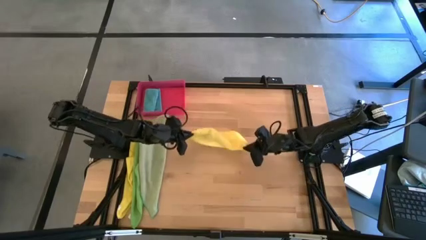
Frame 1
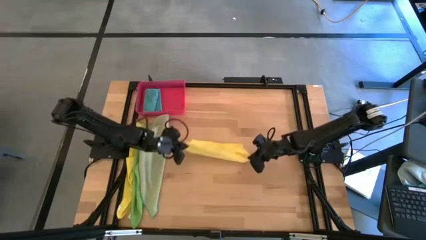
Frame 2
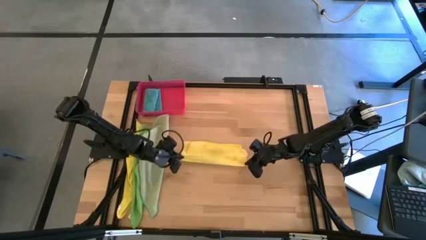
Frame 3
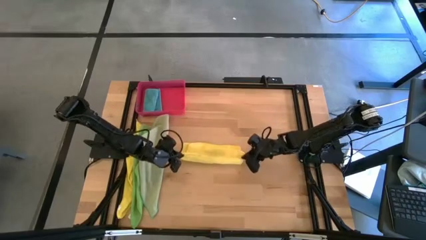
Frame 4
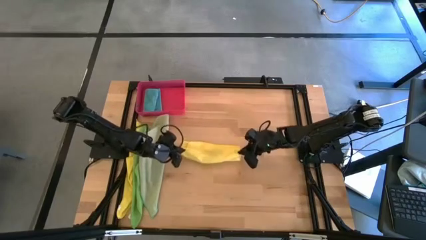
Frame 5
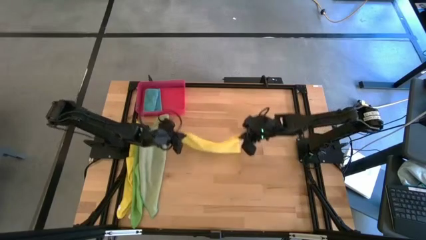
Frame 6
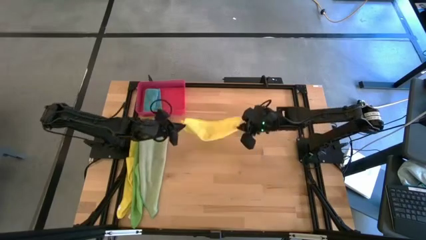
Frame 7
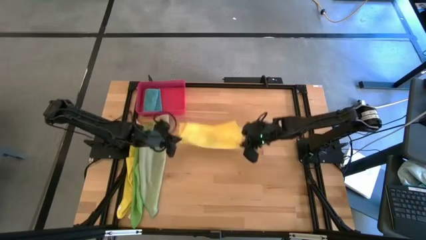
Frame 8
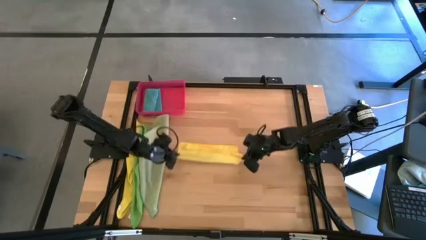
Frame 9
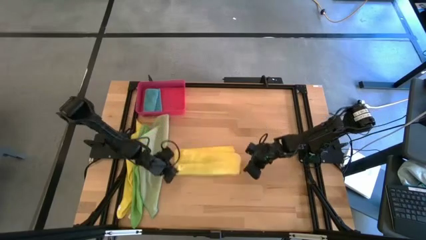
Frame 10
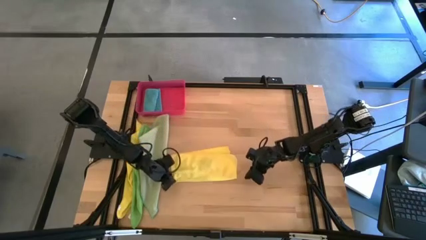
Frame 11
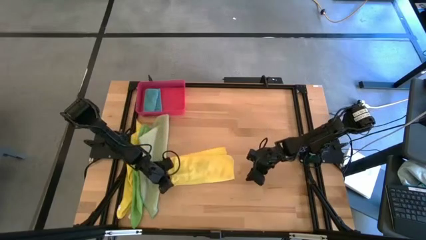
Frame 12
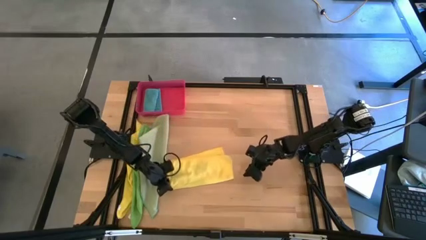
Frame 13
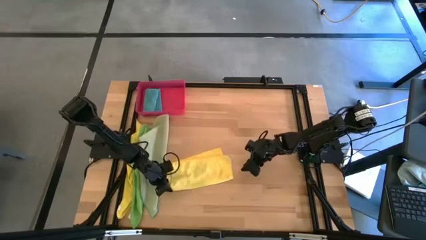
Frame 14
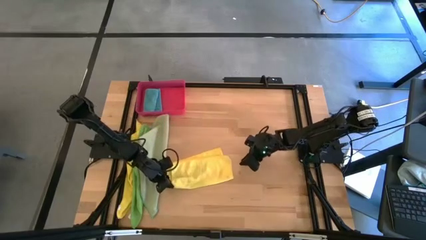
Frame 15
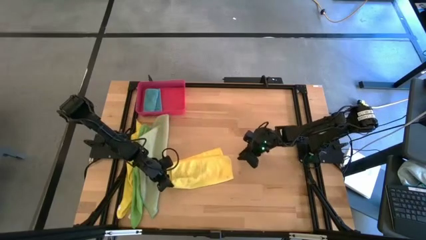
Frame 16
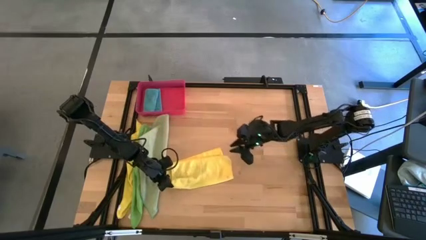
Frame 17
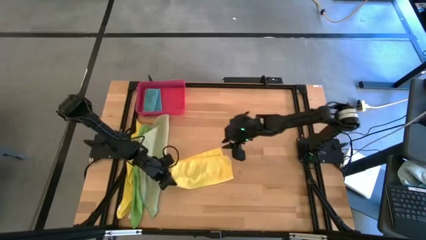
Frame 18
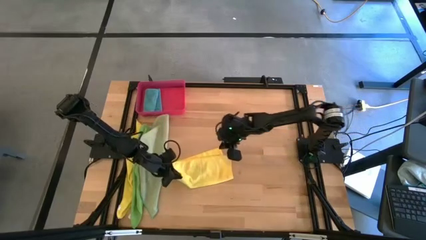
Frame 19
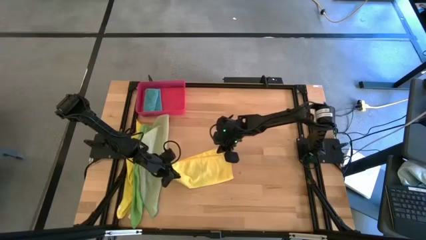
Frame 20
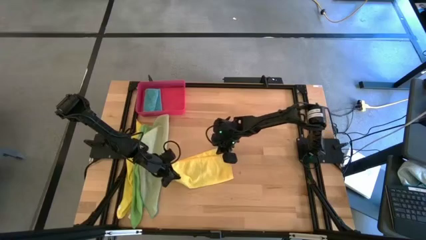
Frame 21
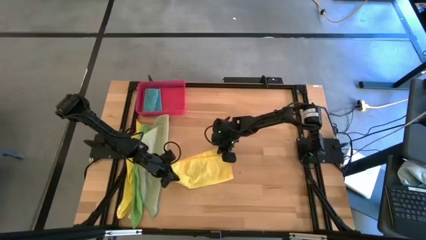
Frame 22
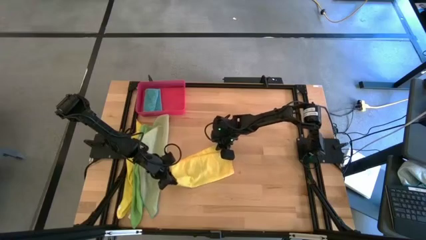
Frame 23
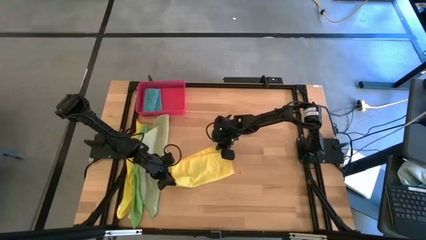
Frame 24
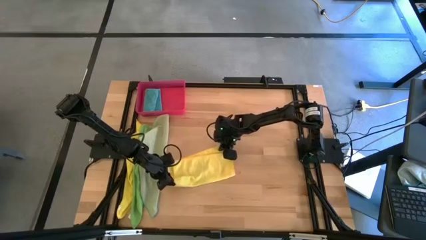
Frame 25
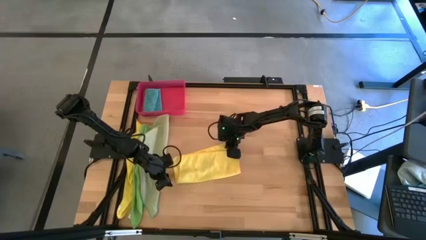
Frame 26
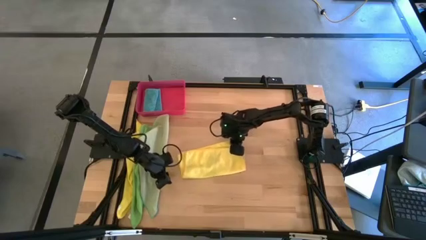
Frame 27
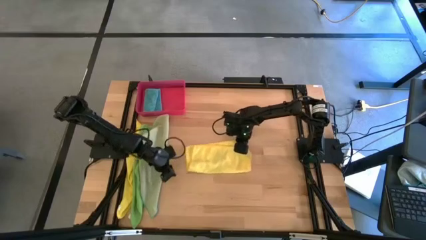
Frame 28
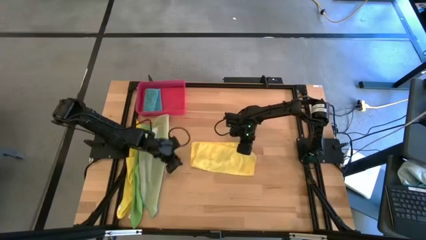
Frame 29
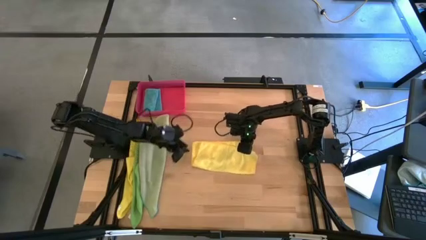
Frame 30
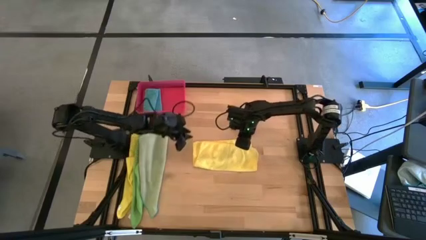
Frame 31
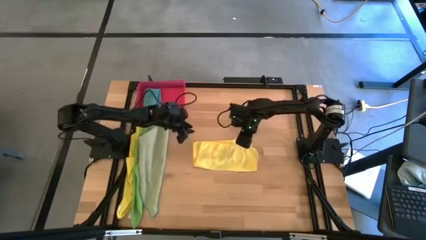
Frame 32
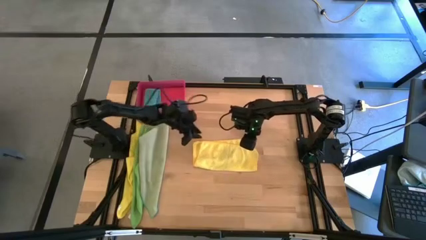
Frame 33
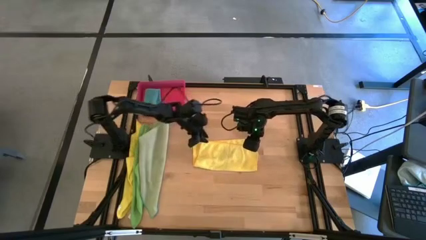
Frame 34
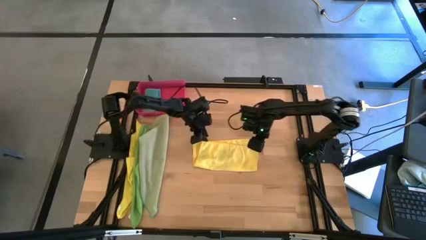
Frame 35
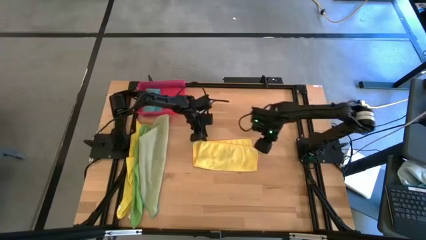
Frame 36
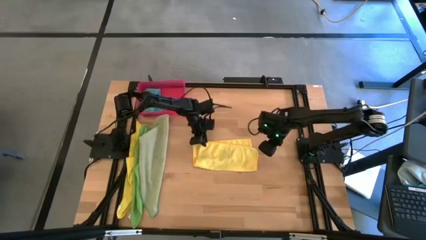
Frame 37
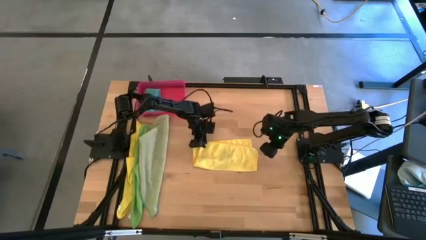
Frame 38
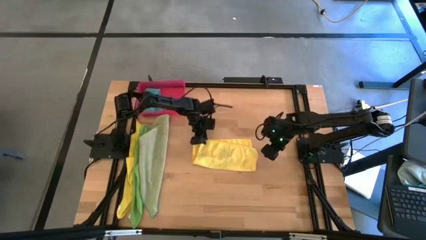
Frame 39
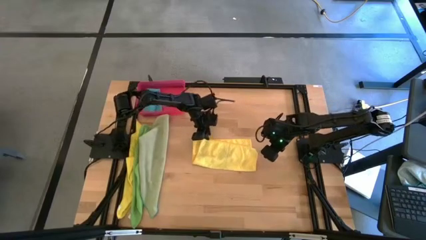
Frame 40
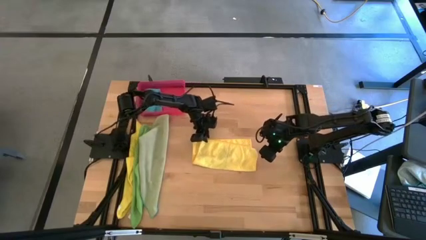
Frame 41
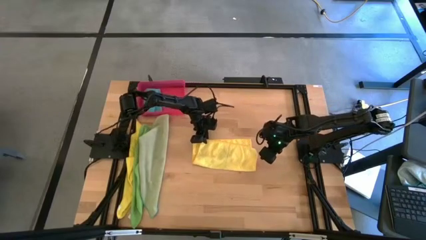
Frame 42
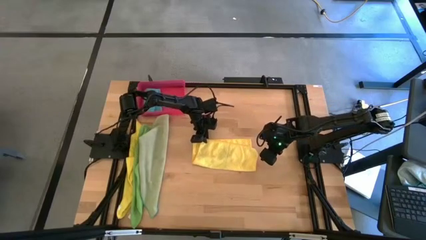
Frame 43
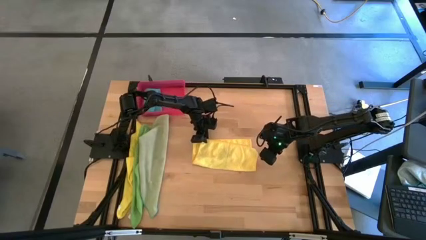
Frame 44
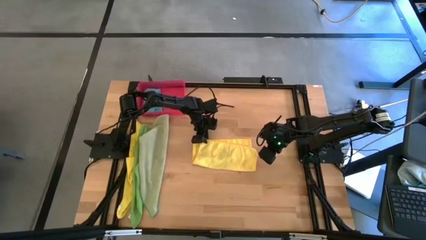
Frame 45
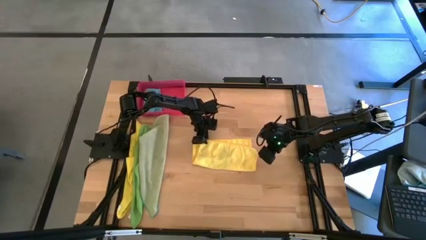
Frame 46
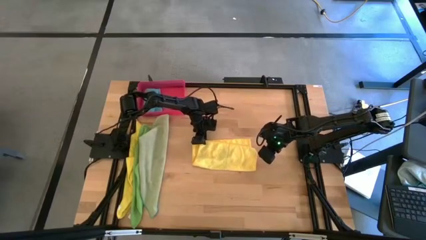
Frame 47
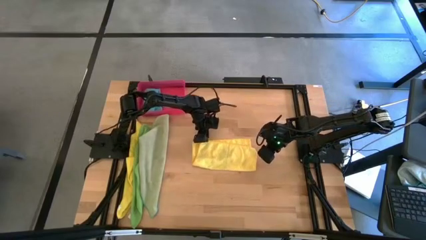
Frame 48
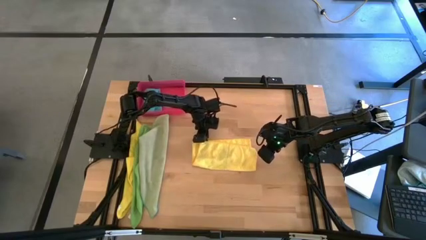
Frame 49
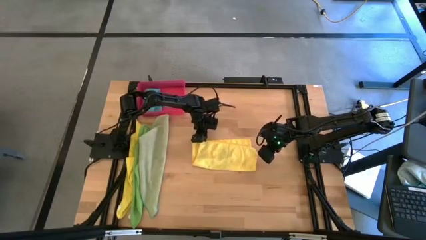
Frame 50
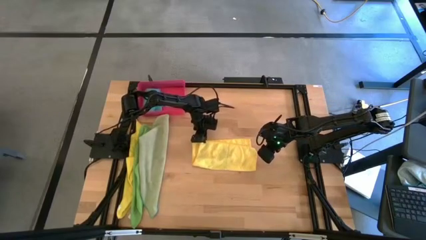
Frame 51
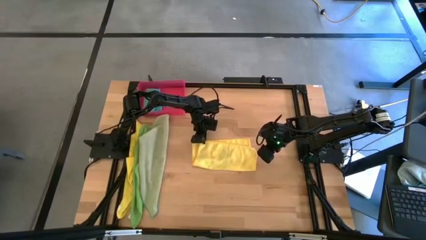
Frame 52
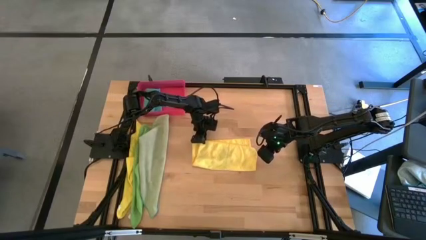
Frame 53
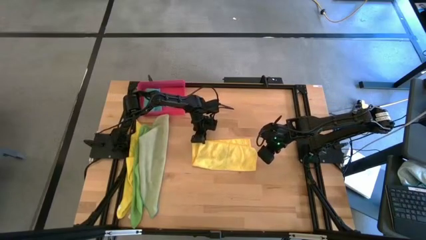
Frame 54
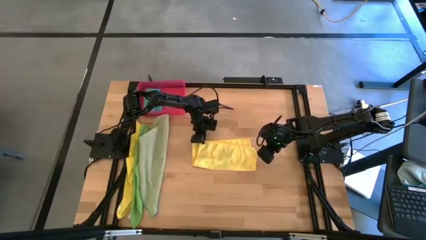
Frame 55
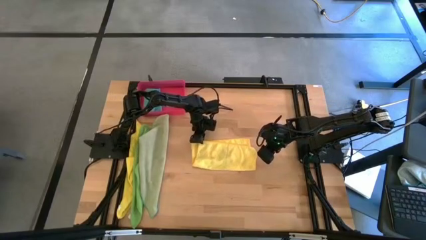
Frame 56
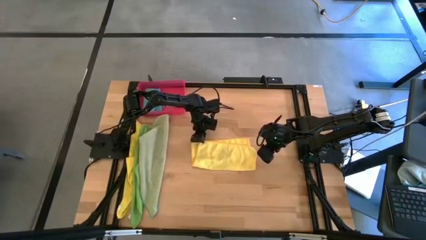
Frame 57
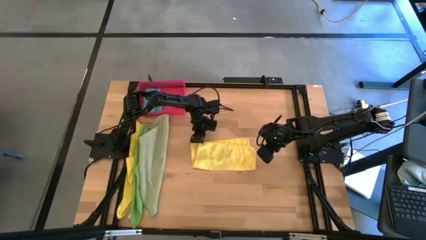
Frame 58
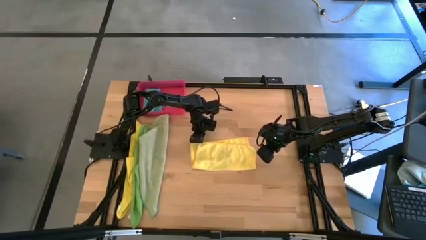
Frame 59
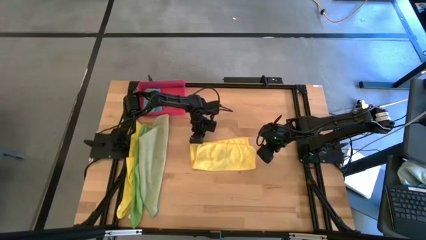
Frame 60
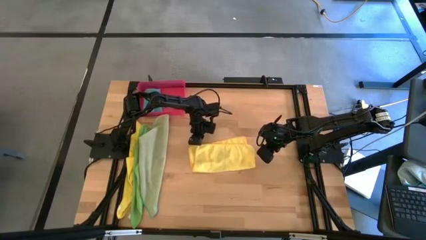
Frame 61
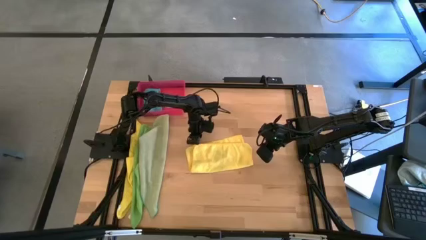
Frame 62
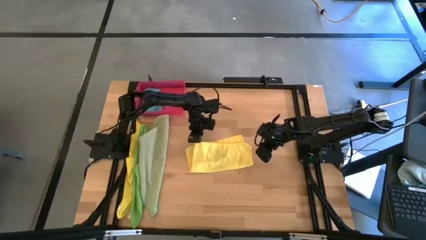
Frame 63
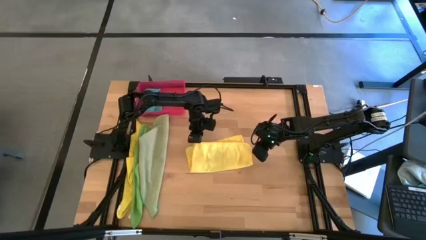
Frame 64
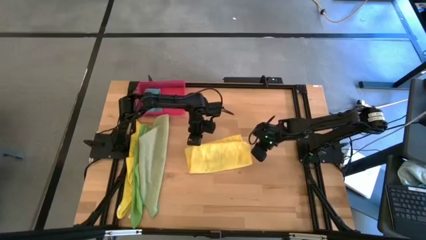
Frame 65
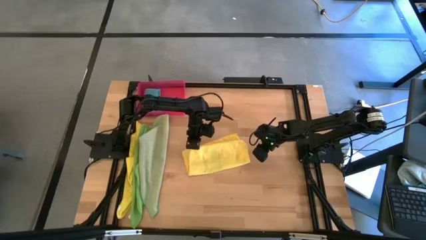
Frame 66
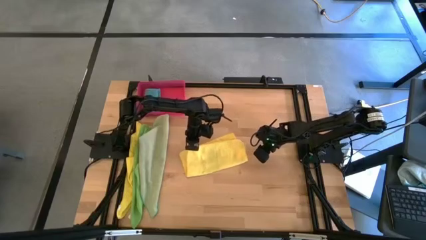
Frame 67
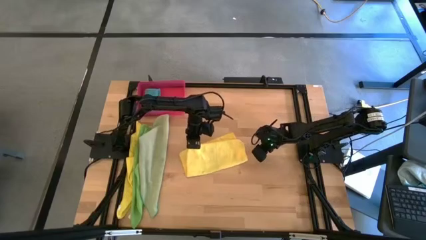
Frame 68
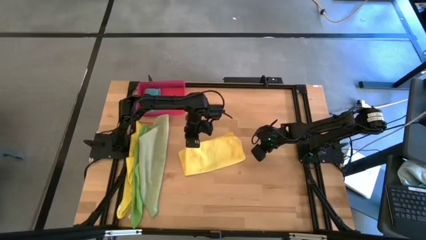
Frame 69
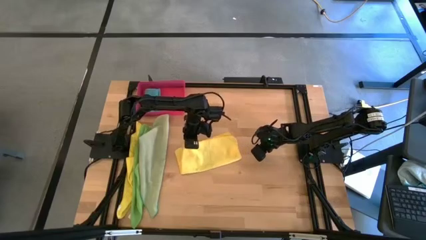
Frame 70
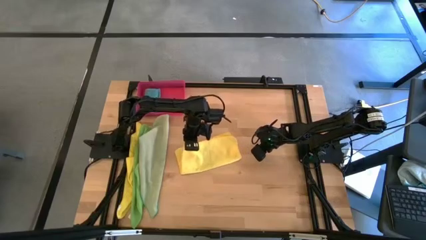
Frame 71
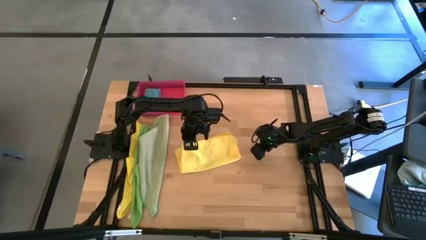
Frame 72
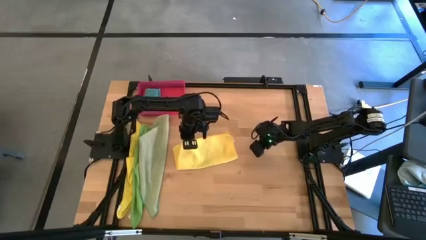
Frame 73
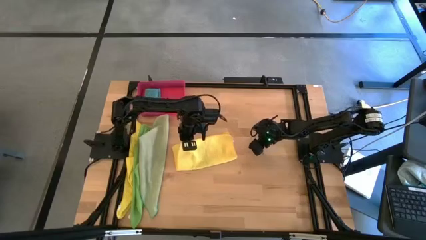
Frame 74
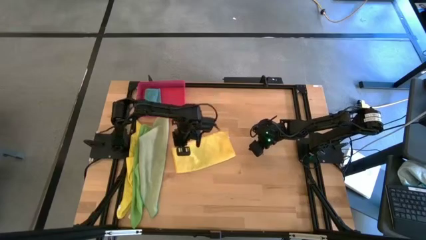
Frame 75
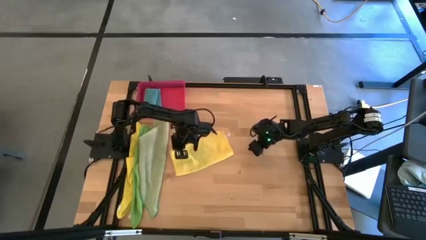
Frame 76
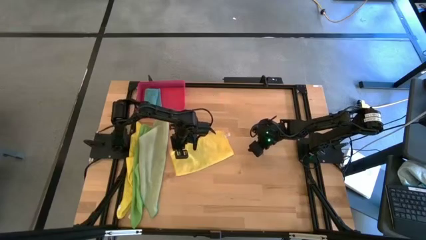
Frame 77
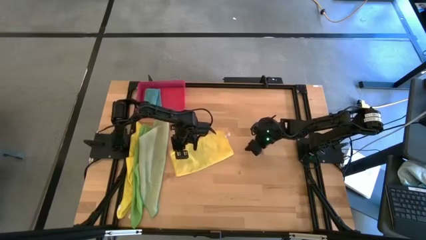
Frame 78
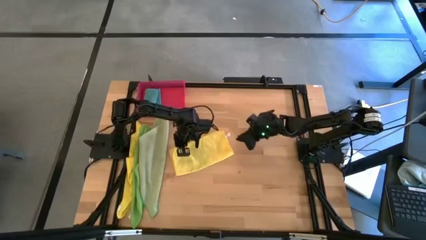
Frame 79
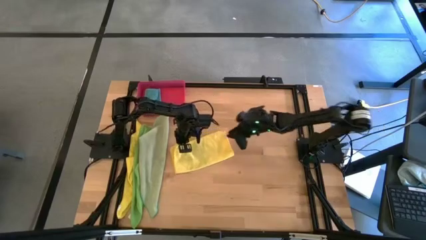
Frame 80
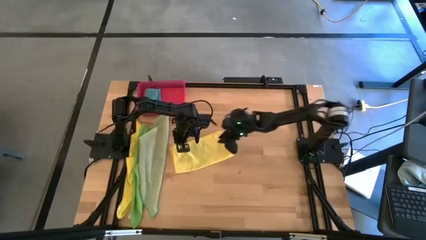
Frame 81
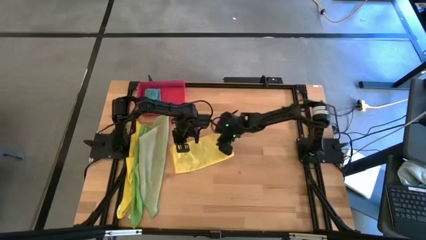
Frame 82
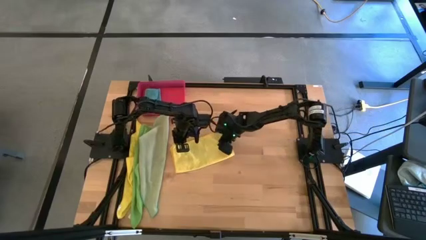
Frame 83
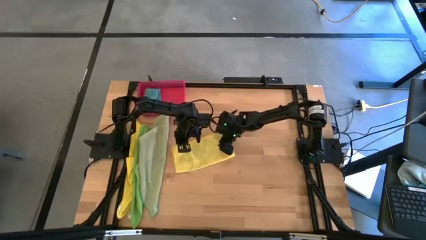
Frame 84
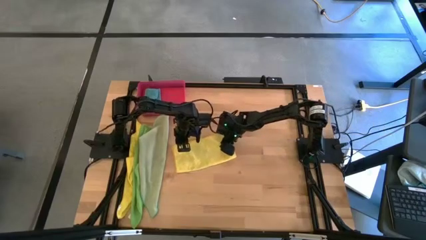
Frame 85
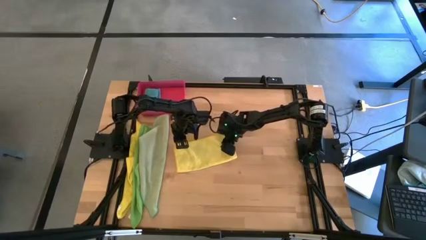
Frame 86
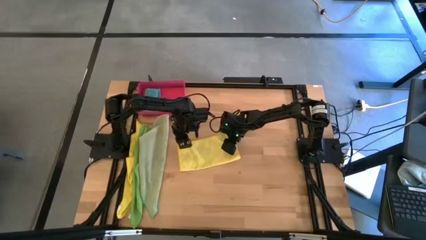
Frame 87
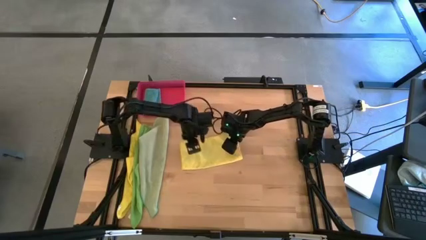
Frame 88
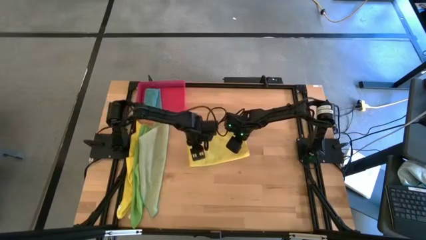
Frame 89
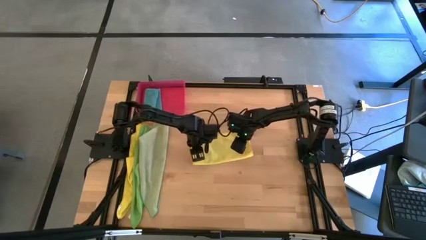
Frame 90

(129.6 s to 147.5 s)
Task: Fold microfiber towels
Fold the right yellow microfiber towel on the table
